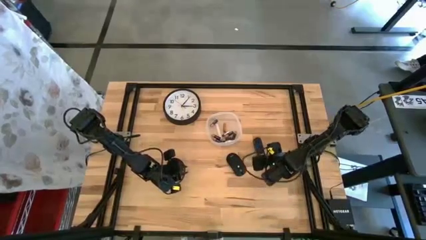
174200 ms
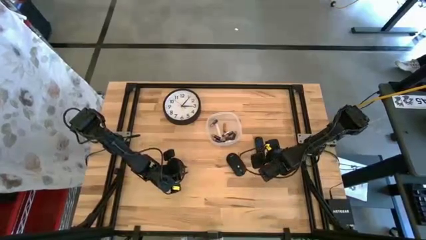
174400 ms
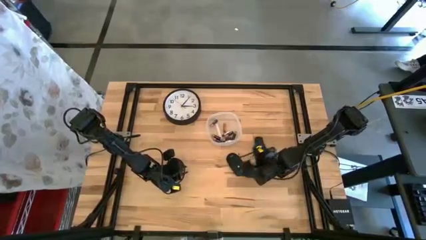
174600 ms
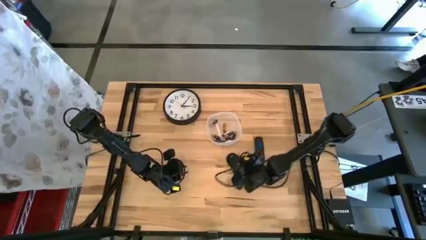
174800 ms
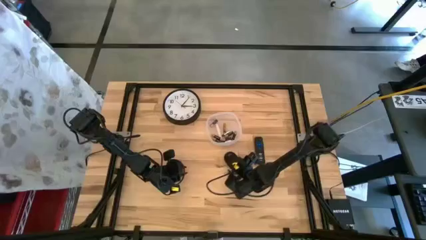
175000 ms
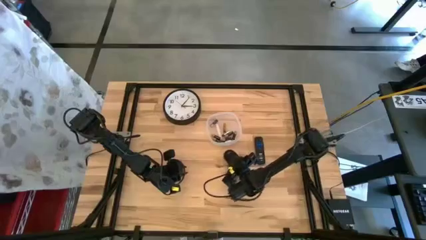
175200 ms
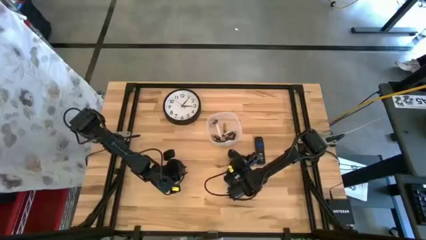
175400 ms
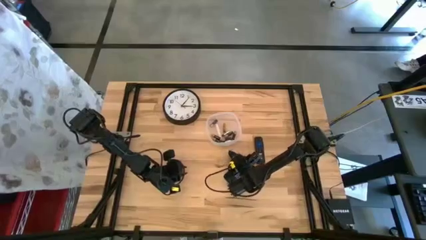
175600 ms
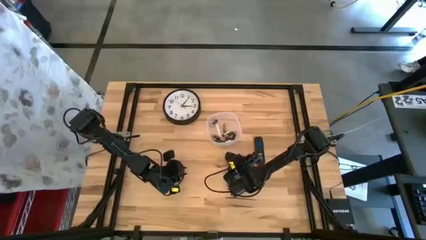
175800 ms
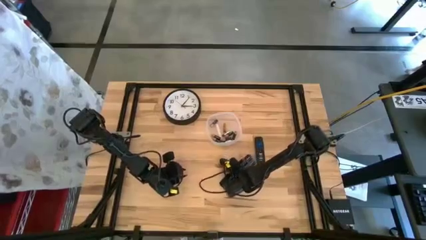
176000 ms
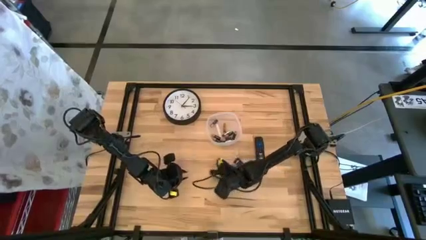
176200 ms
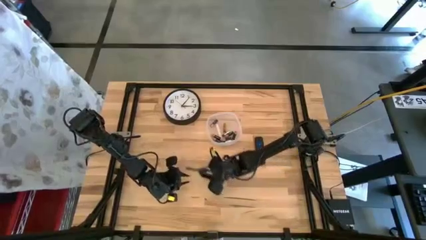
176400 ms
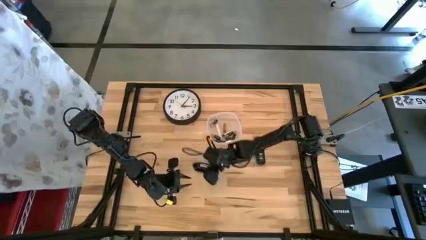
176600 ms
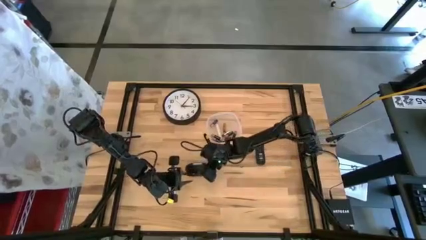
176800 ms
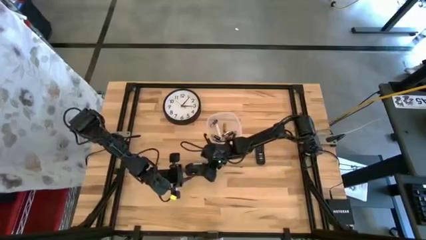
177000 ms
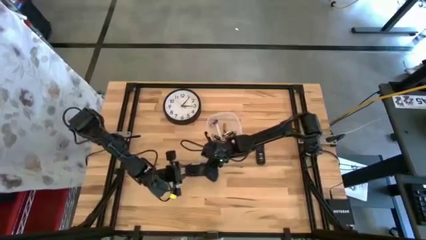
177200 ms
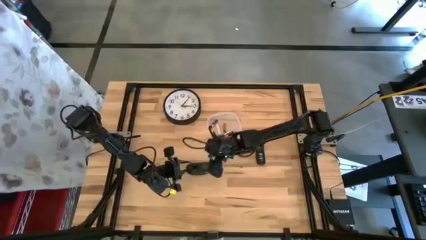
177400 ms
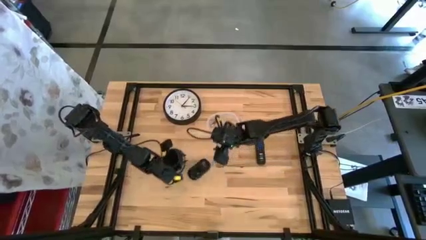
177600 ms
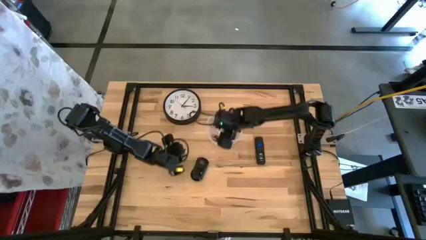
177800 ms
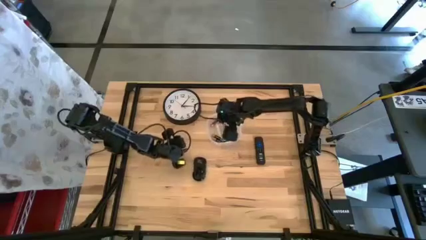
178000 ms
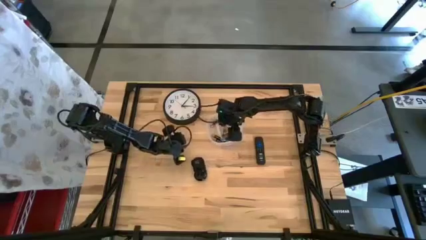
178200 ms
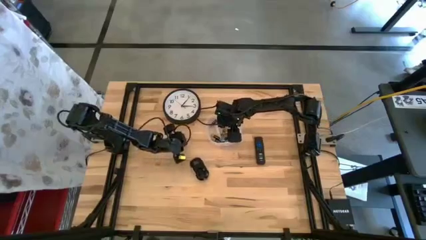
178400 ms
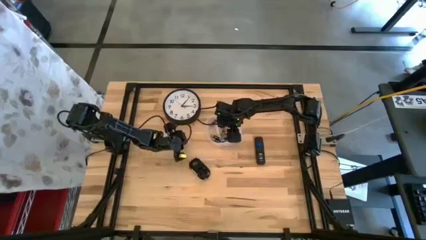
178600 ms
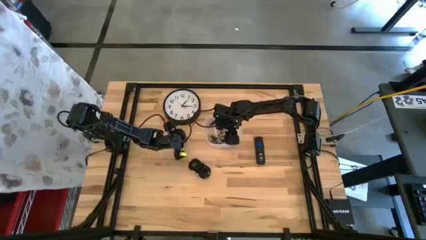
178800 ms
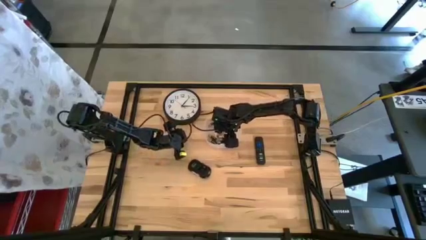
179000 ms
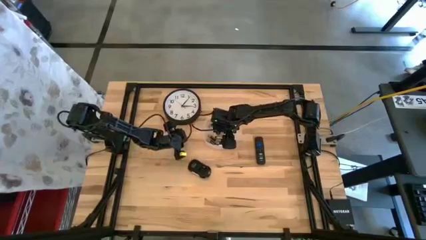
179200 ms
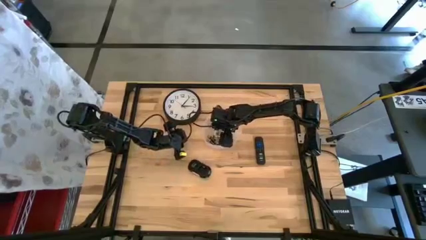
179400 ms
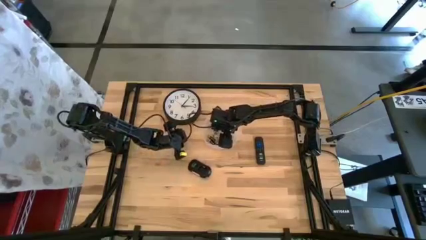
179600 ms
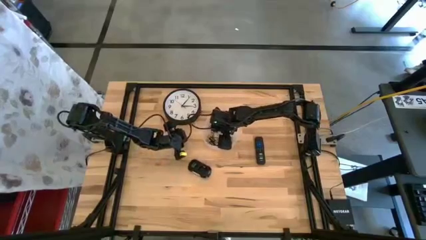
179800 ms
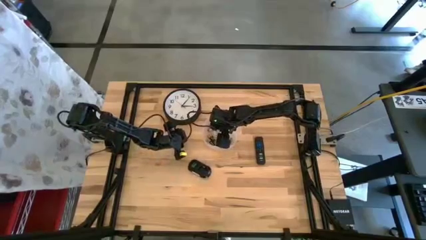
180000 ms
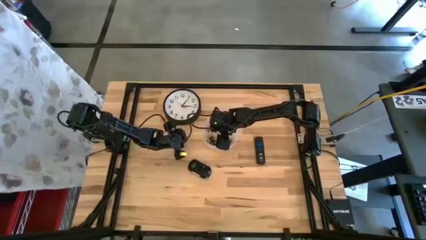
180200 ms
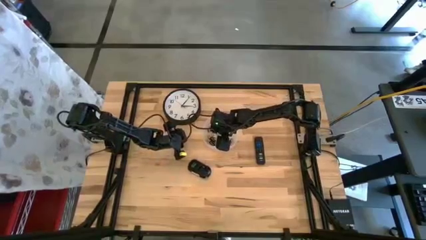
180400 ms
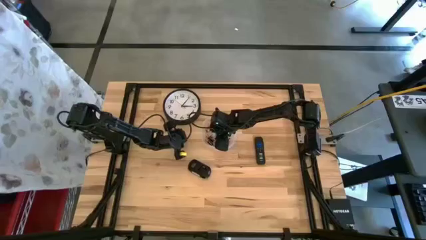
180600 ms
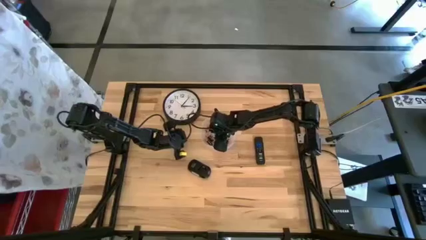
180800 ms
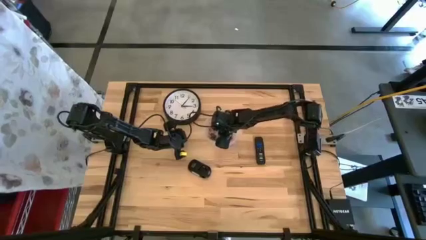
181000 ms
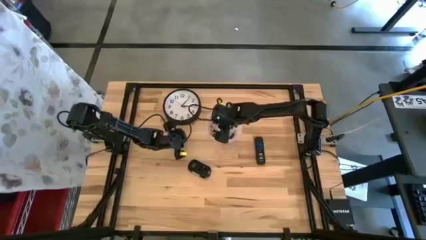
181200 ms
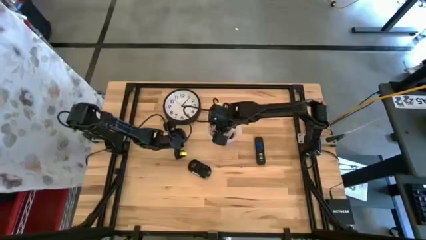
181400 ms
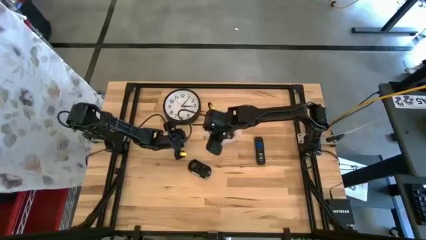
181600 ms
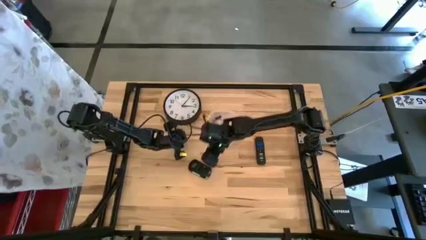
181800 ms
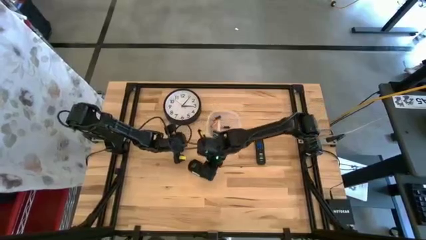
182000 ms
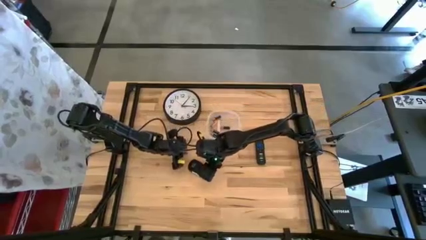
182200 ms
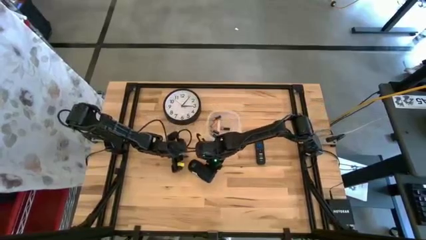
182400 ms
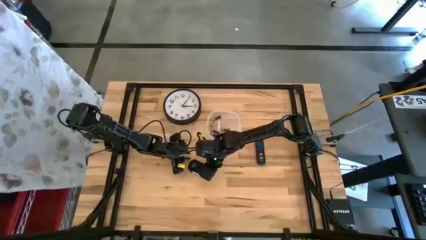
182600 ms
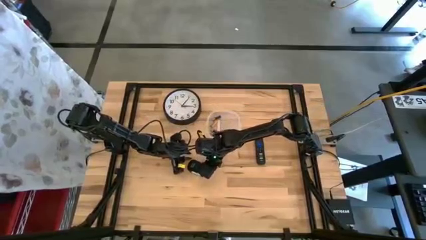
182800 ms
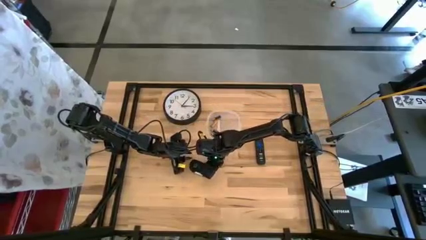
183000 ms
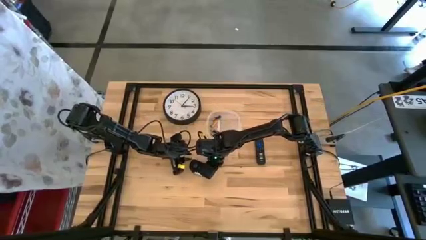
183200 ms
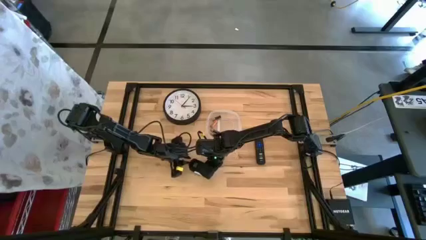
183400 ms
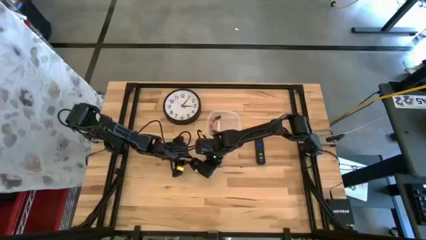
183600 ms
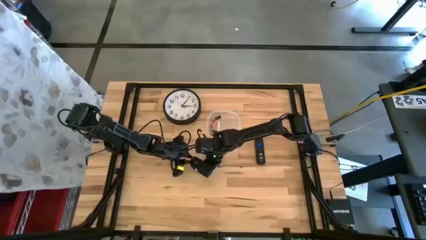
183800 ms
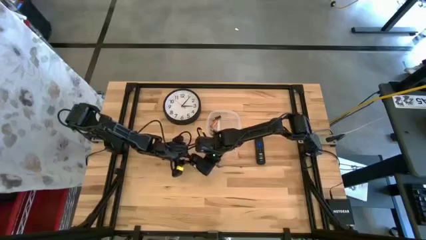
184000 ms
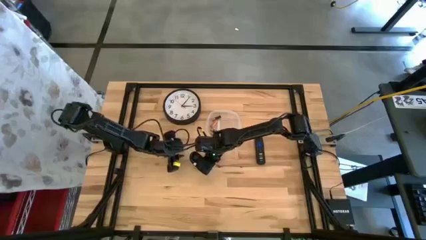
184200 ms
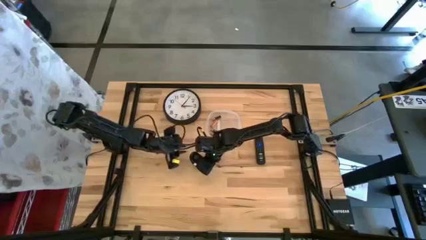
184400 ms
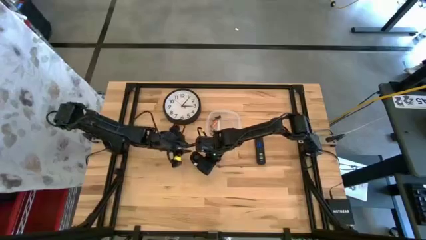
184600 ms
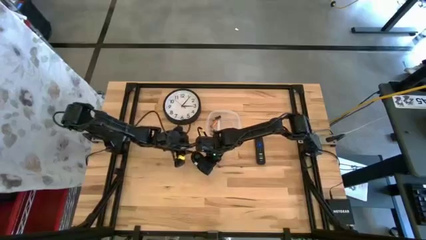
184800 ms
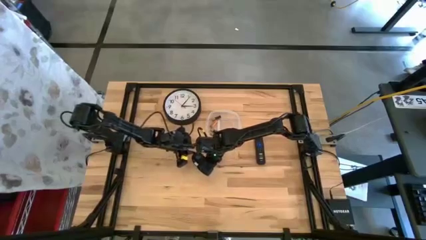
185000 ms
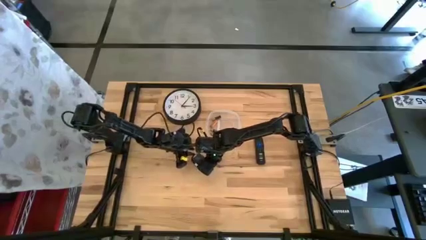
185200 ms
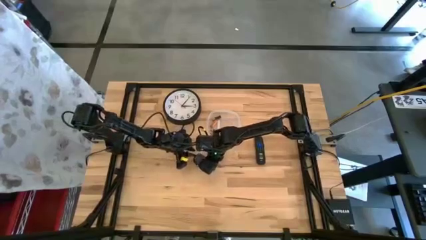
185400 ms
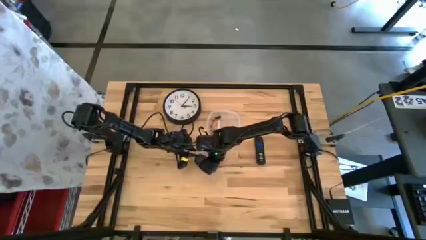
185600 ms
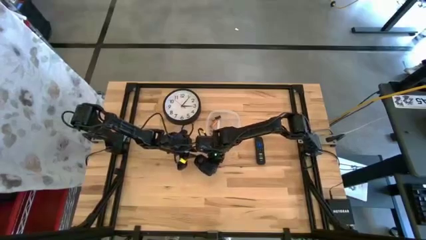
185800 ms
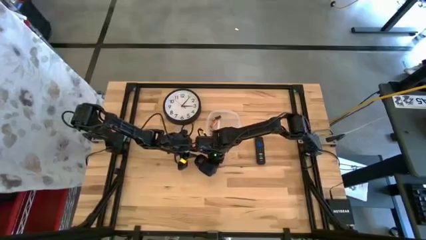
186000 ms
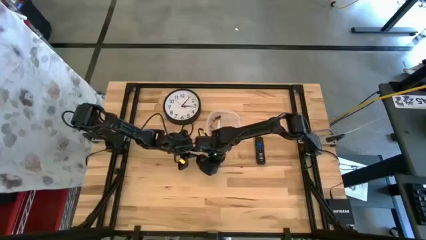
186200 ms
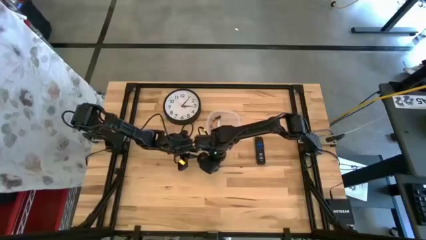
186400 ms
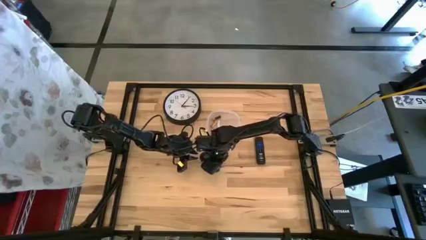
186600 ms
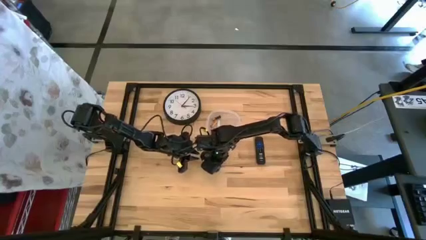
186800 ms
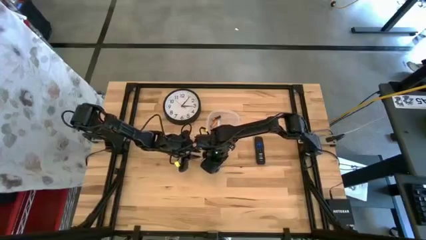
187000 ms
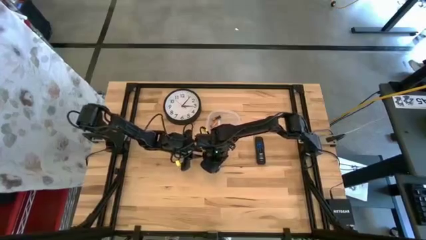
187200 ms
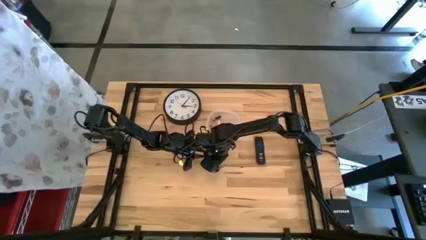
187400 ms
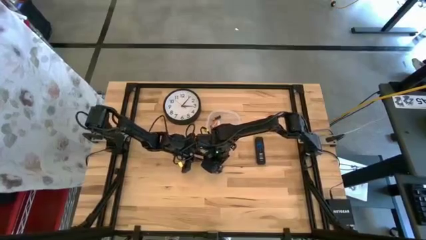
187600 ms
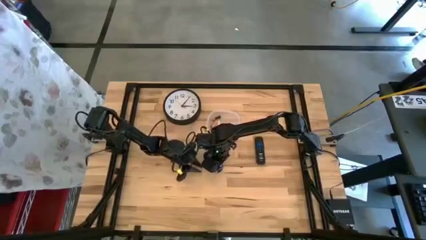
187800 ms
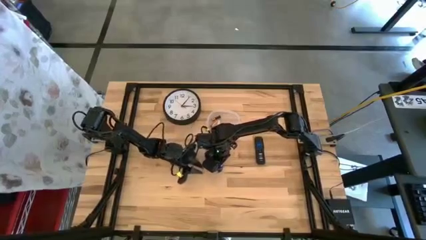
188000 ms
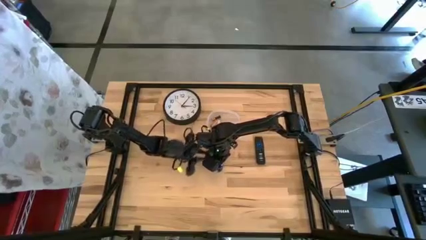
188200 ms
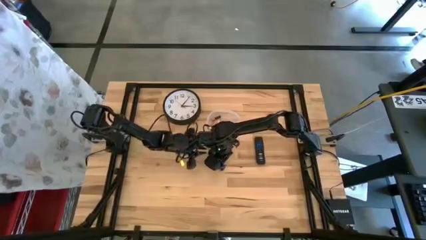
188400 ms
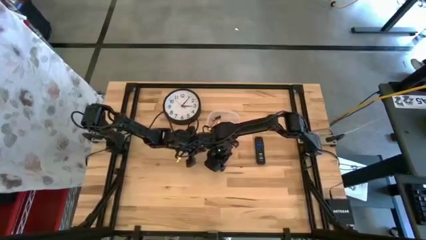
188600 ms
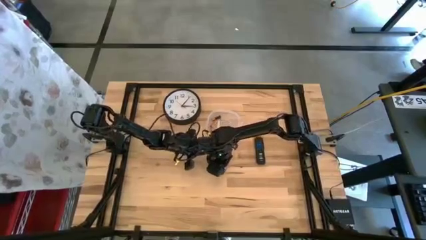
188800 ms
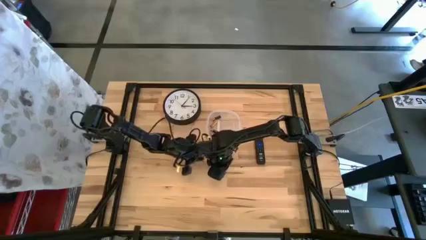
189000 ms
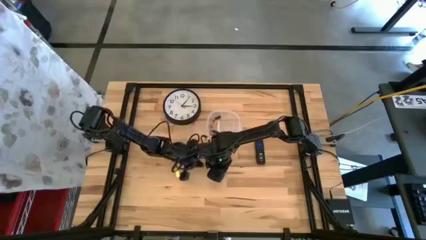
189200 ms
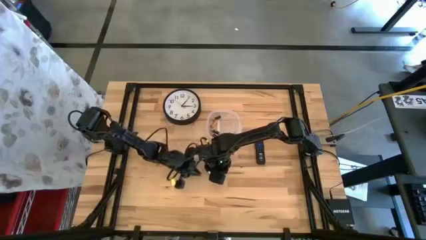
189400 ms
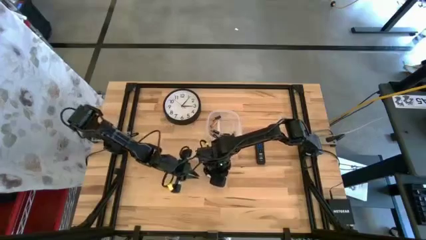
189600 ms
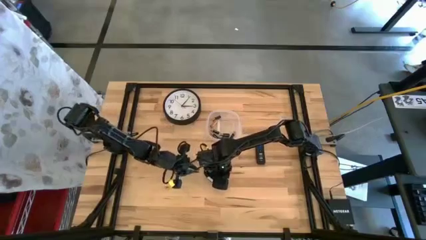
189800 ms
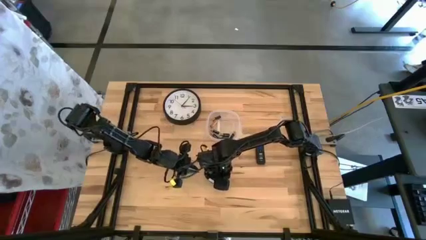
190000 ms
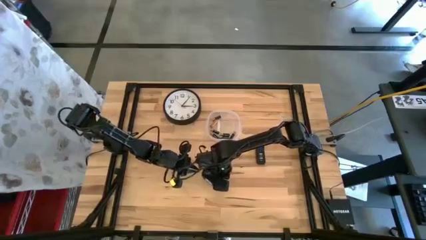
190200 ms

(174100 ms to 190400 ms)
Task: Insert battery
Insert the silver battery into the computer mouse
